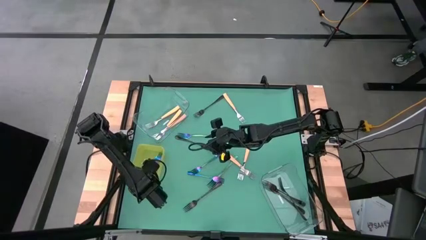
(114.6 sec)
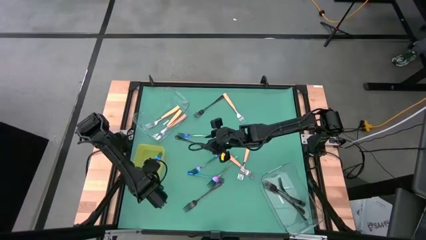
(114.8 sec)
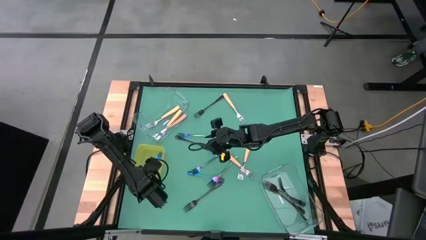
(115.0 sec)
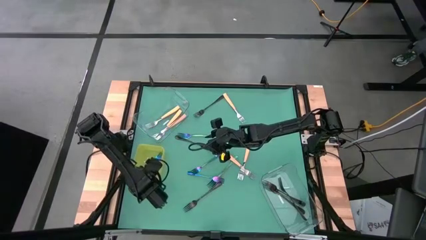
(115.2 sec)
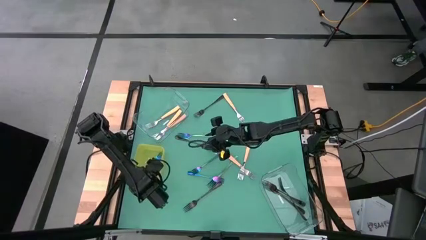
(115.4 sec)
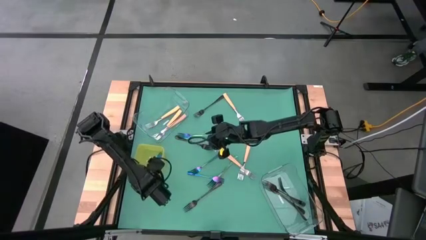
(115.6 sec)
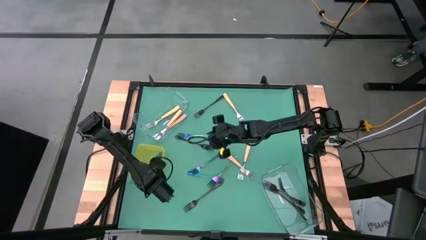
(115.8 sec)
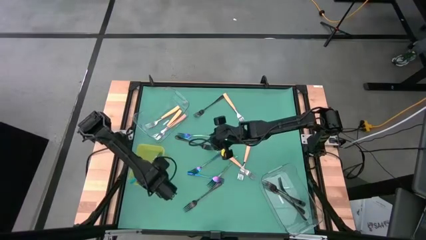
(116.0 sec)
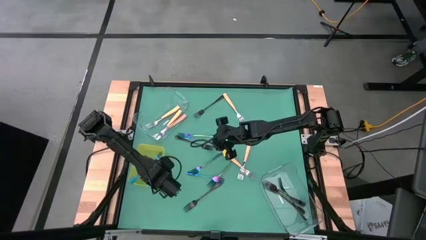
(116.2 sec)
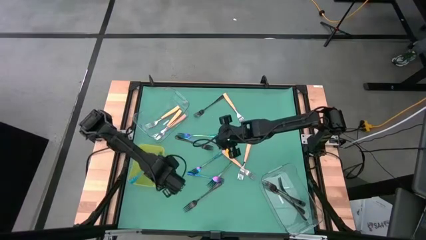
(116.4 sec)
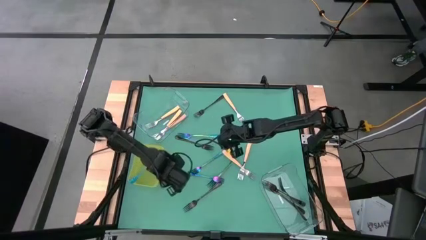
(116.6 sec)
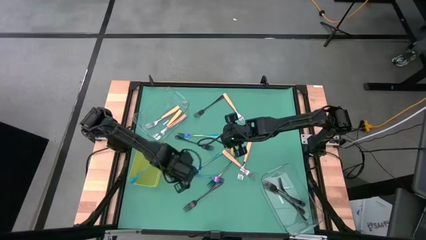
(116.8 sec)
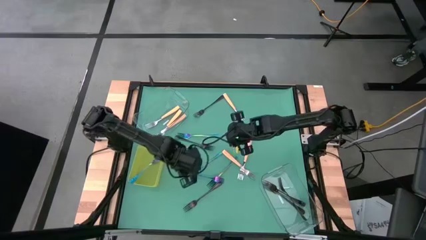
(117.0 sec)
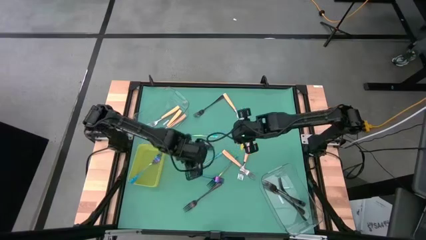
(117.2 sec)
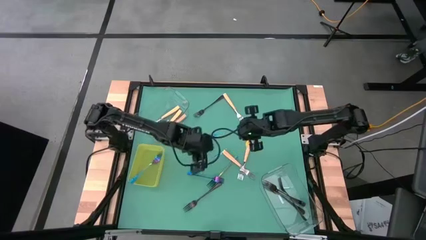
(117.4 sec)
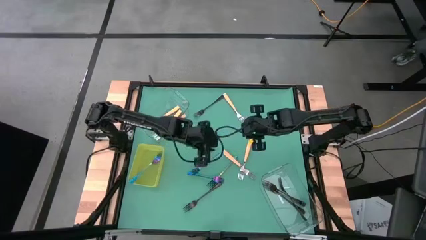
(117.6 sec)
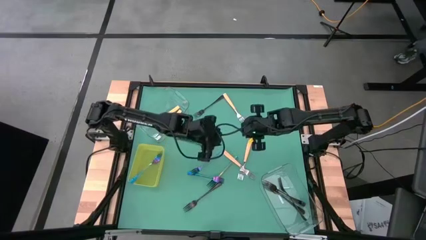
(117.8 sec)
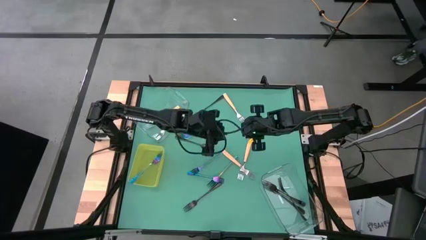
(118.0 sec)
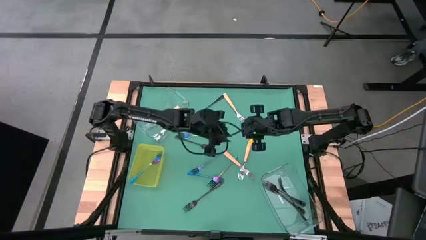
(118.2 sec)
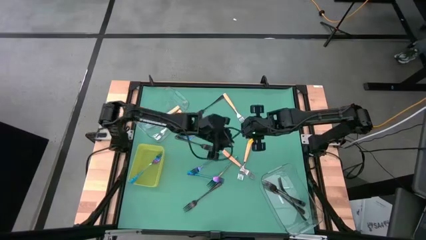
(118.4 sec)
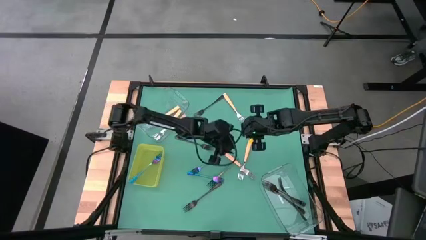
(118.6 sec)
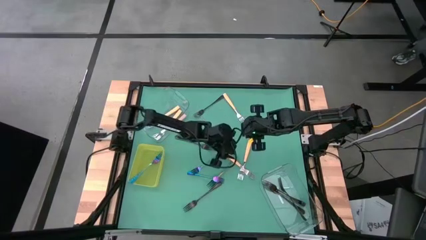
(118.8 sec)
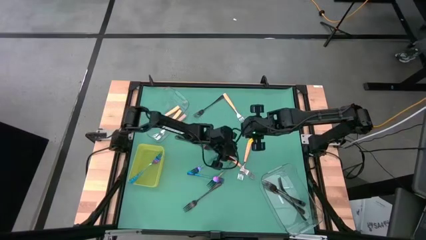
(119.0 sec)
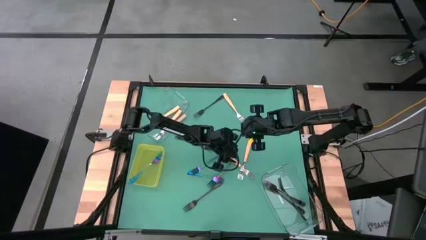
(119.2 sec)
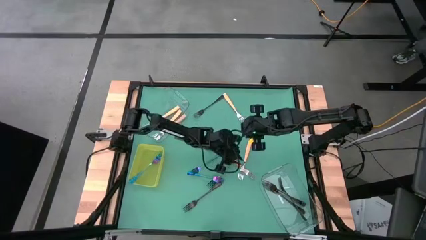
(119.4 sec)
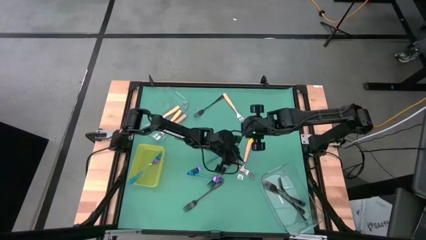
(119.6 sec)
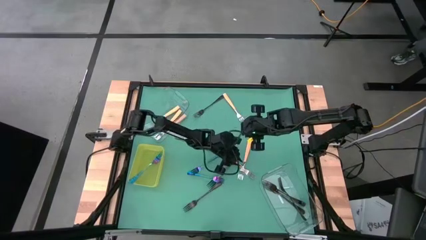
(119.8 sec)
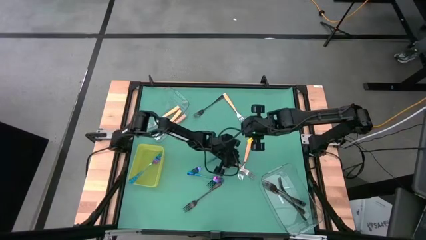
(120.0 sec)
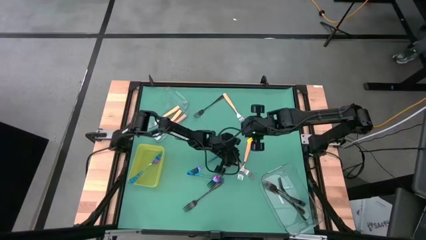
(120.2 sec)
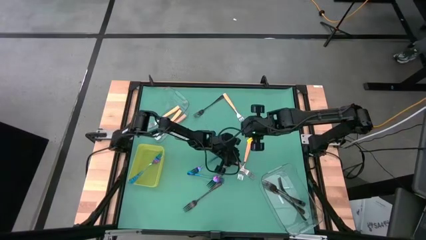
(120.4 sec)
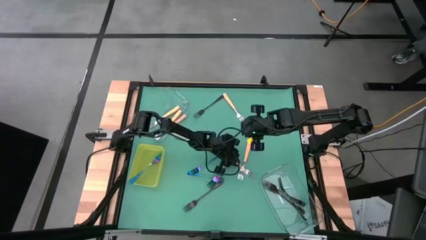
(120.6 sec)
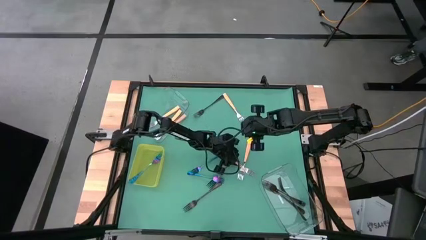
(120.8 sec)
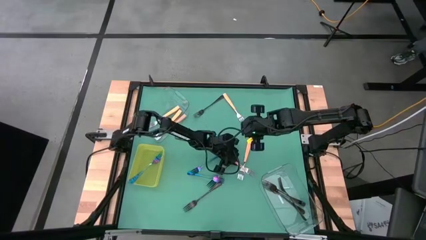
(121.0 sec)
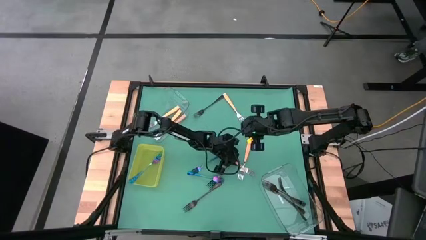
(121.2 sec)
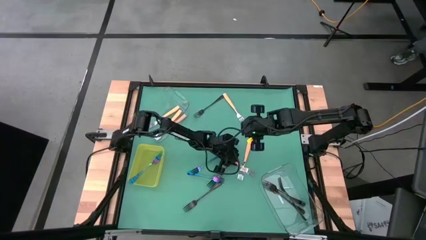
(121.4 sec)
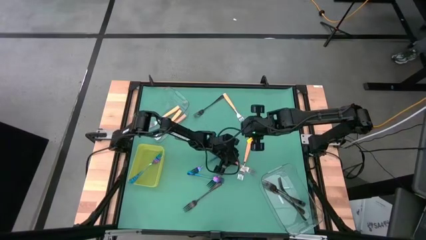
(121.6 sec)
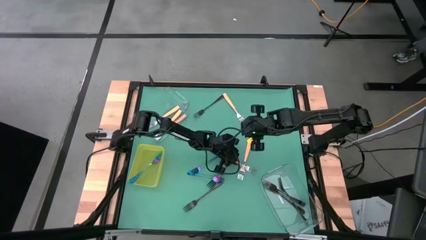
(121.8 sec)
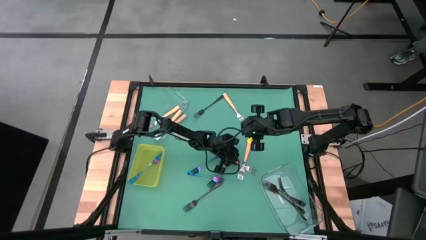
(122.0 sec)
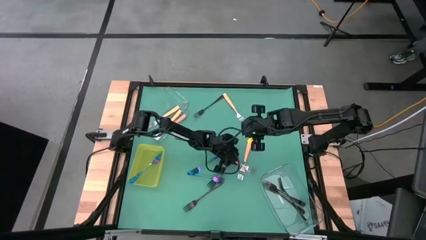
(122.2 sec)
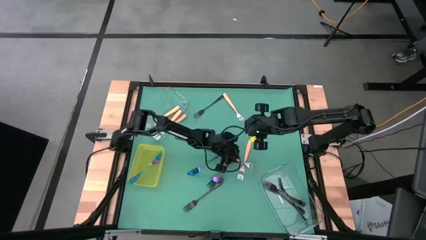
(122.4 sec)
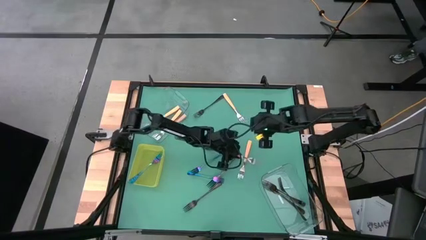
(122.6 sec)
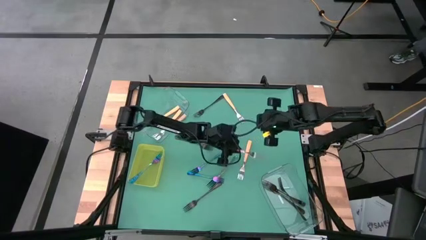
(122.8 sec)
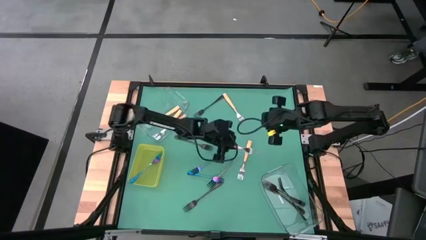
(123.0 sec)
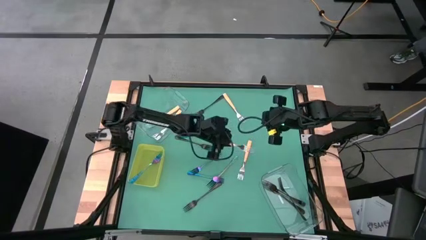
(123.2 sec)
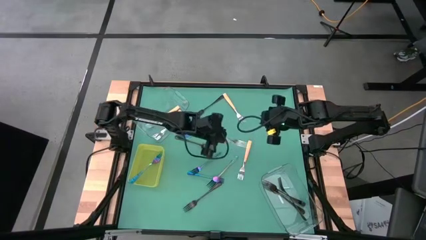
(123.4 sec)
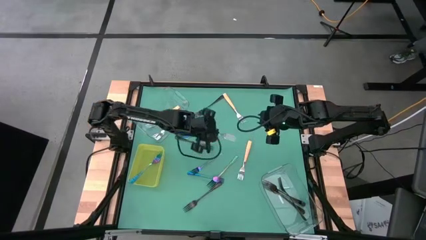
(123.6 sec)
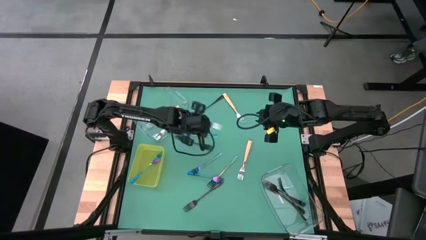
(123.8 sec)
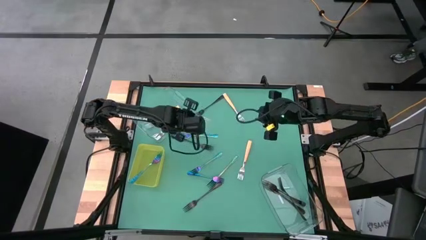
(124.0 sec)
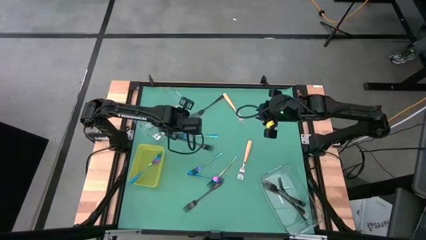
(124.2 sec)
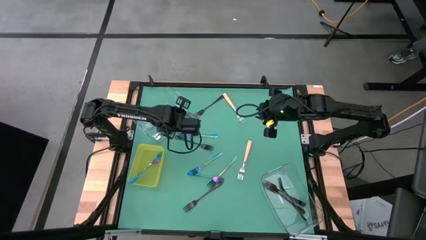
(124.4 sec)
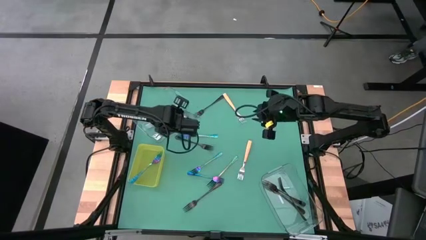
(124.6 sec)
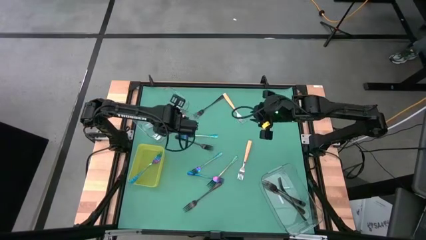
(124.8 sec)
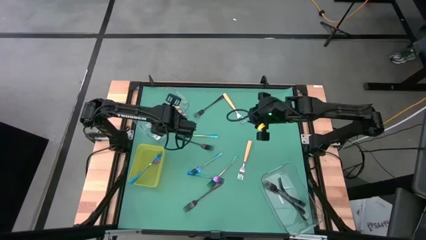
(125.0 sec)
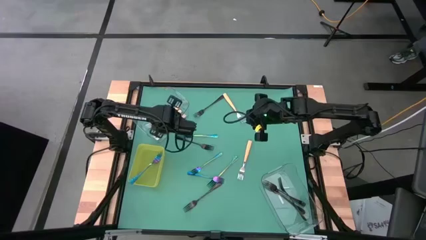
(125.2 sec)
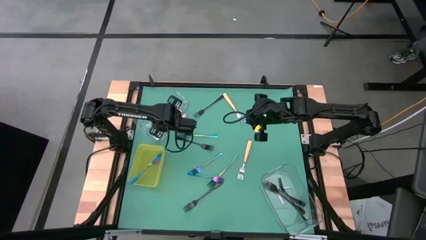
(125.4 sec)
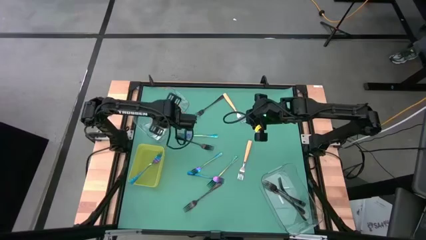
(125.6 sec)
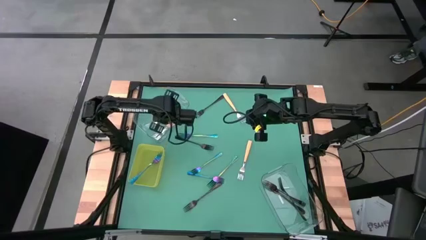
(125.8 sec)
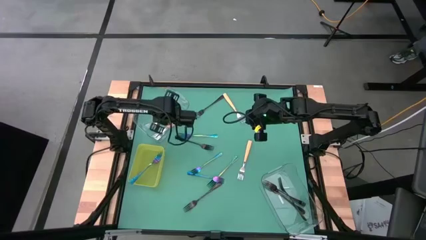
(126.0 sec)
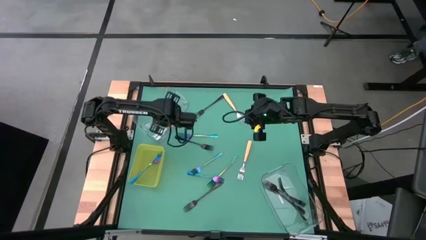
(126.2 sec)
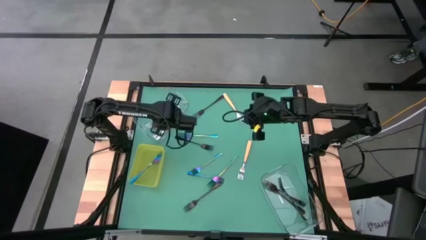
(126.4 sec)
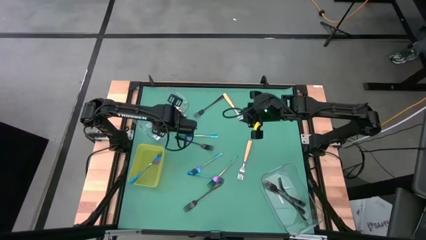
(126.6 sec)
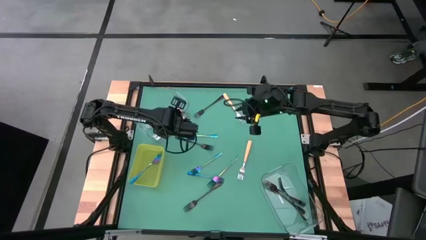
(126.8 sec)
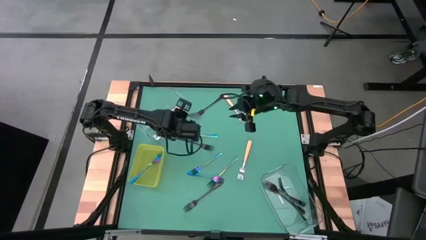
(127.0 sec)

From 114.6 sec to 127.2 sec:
Task: Sort silverware by color (type)
Put the orange fork in the top transparent bin
